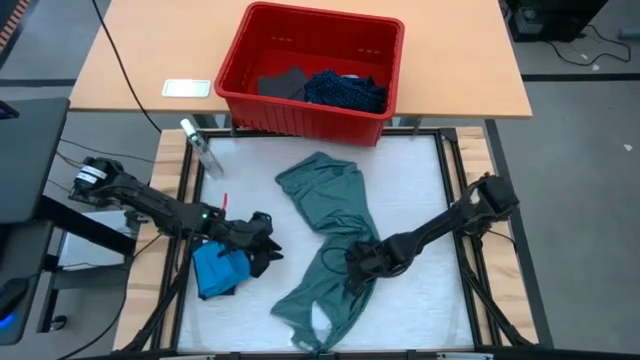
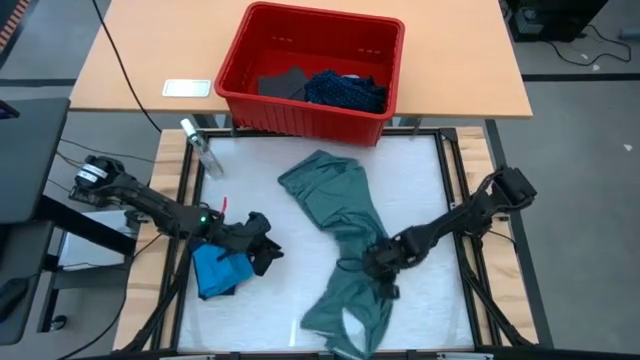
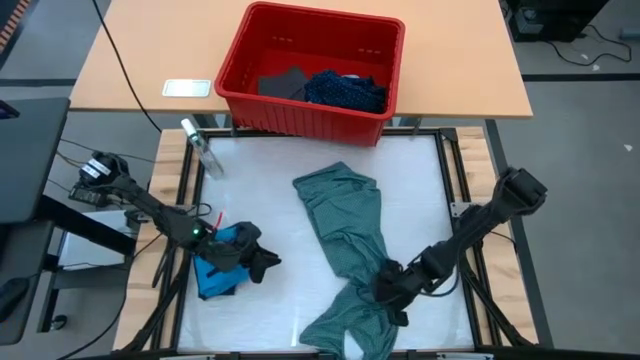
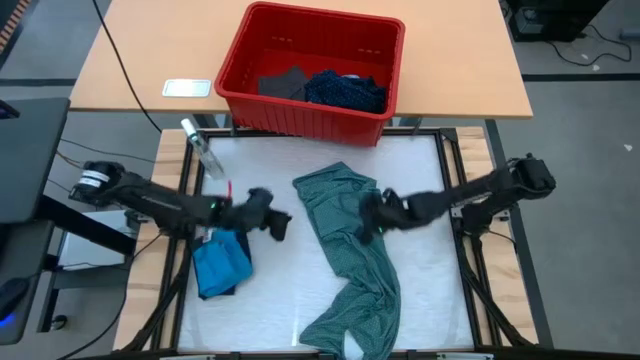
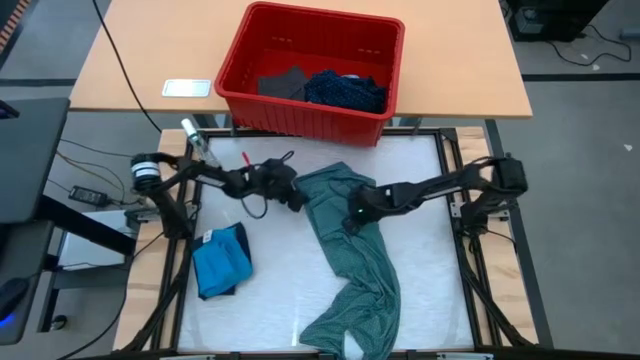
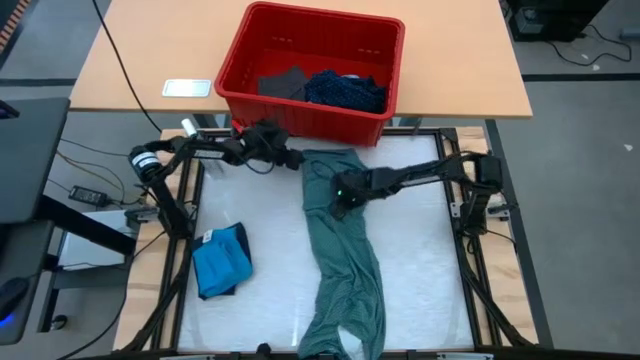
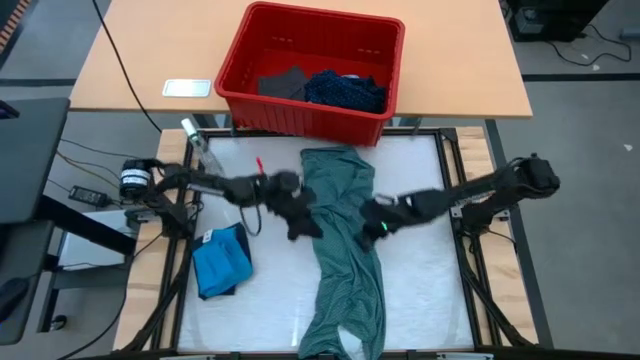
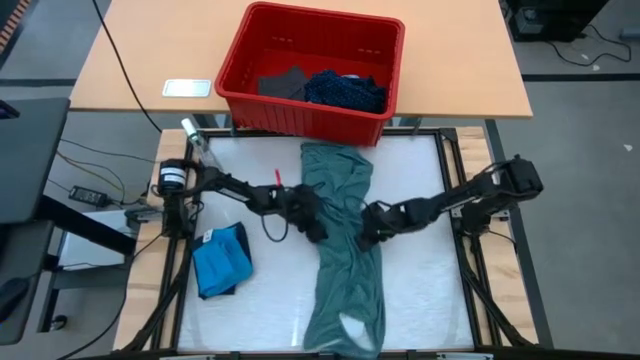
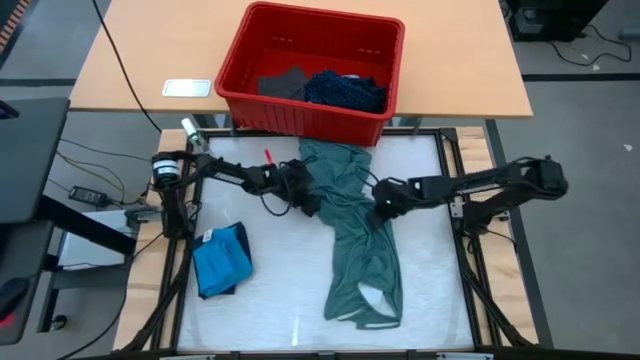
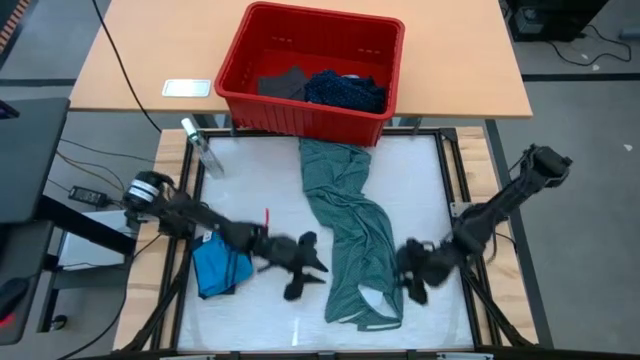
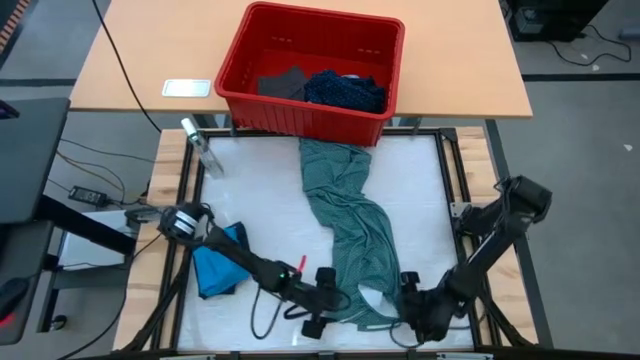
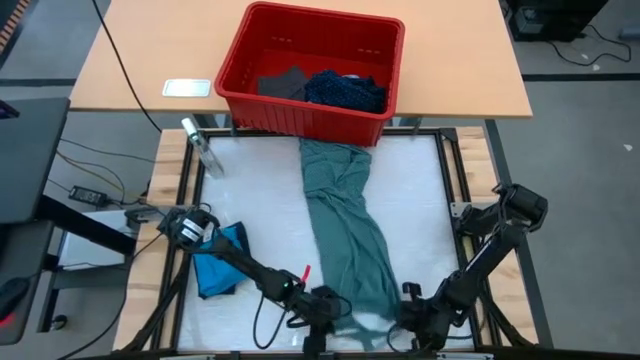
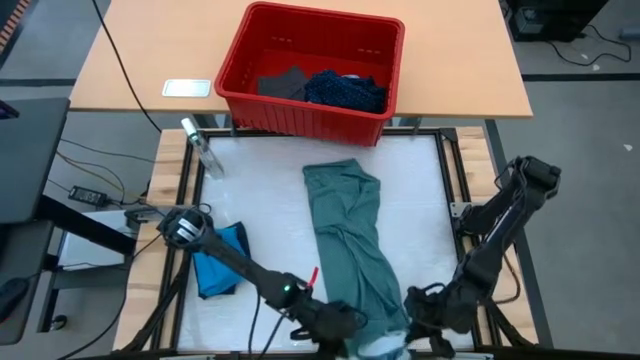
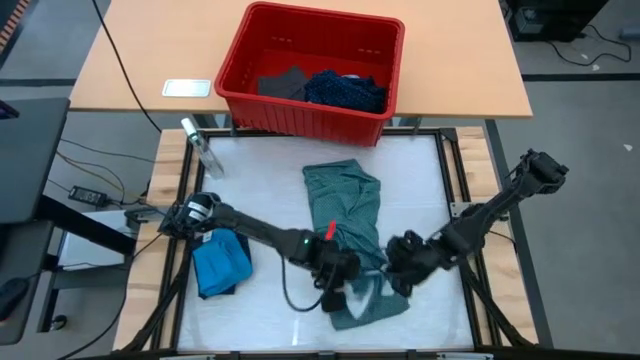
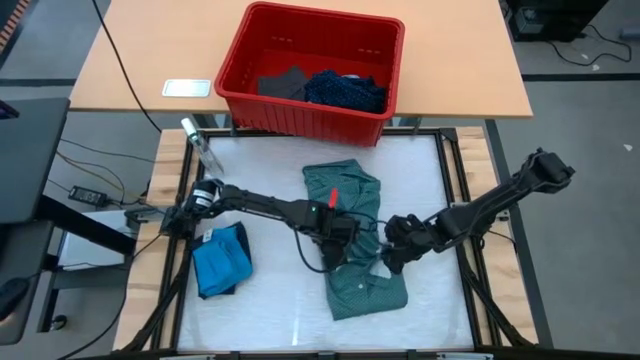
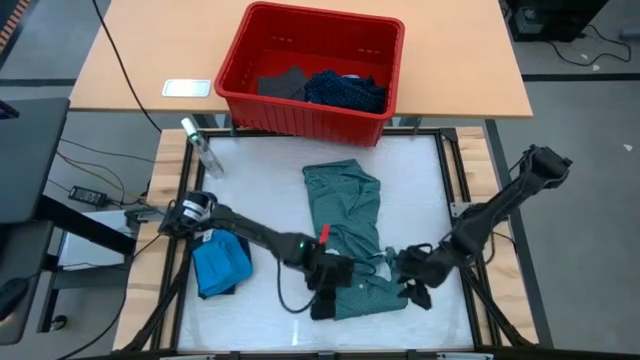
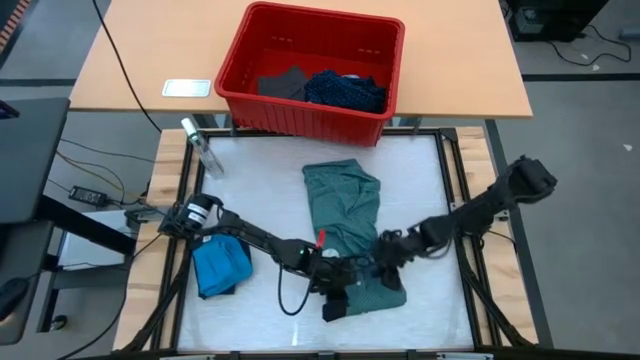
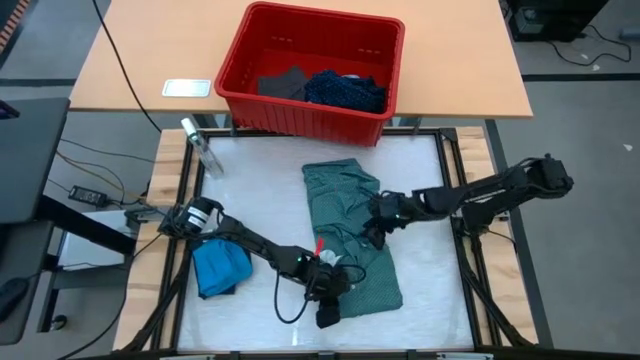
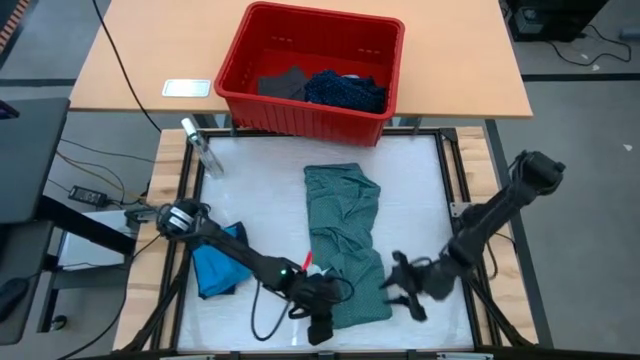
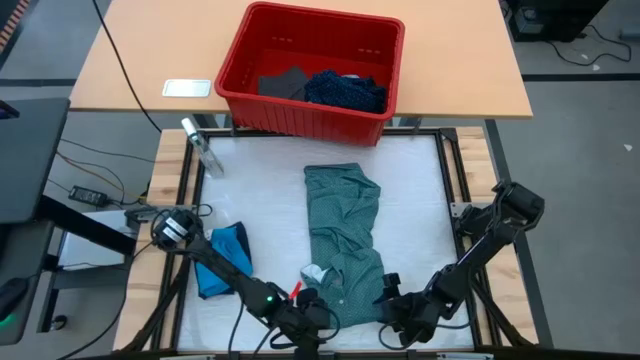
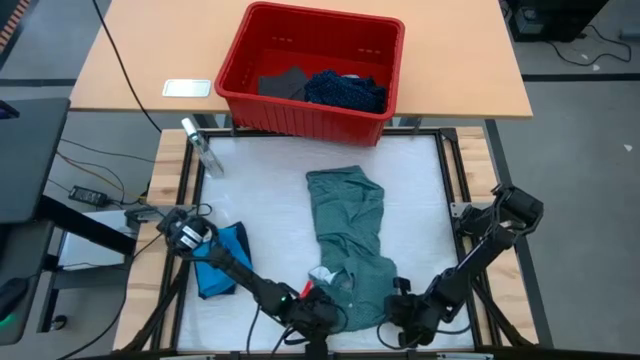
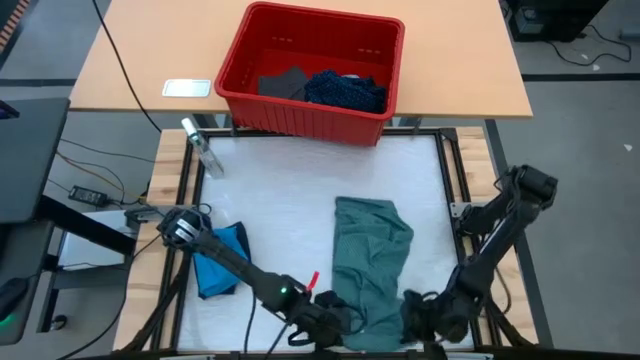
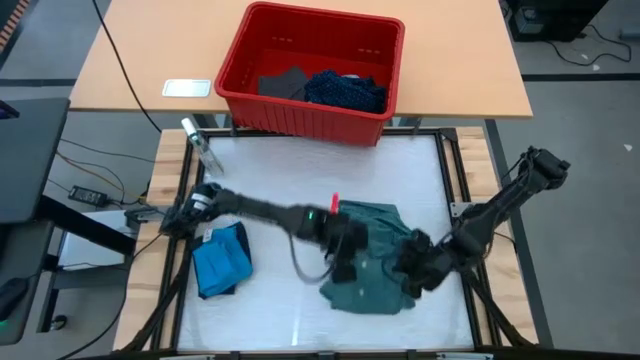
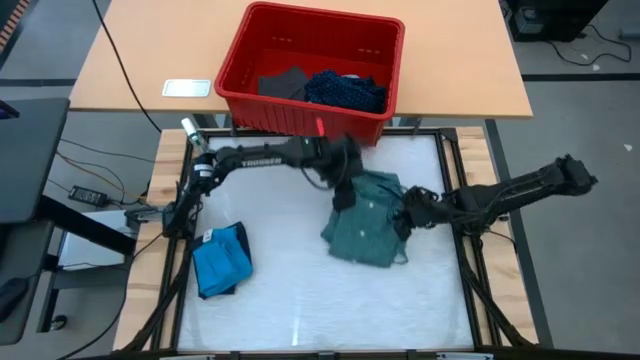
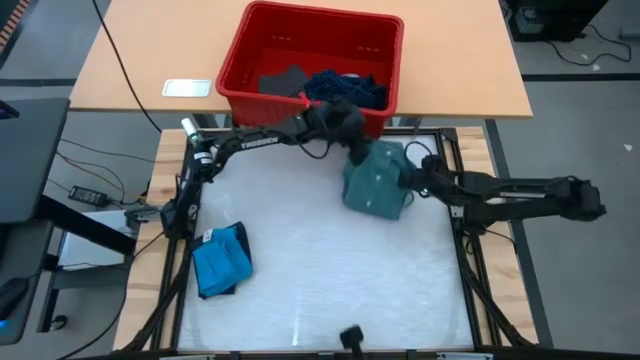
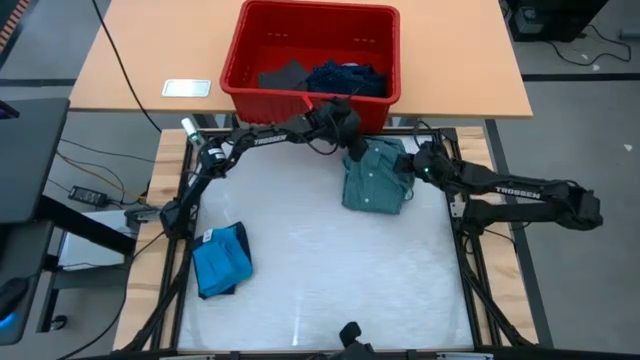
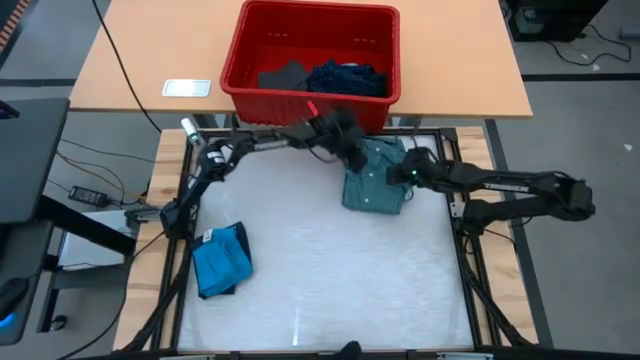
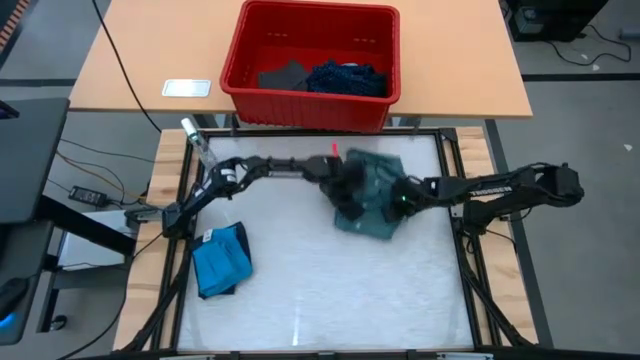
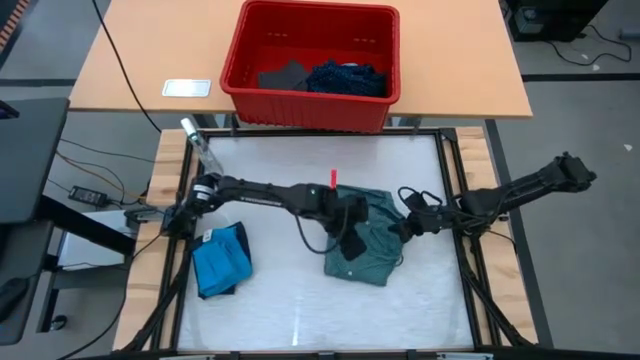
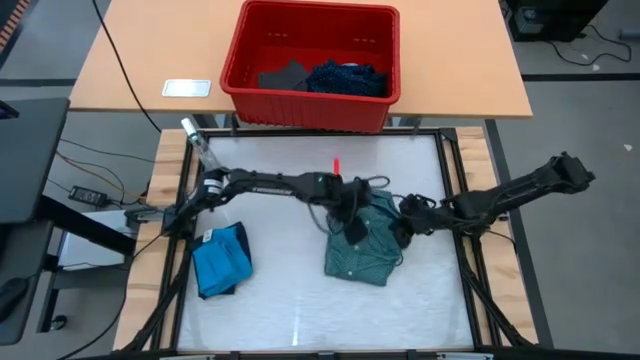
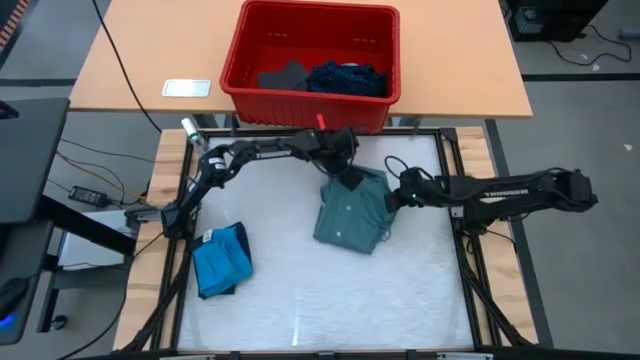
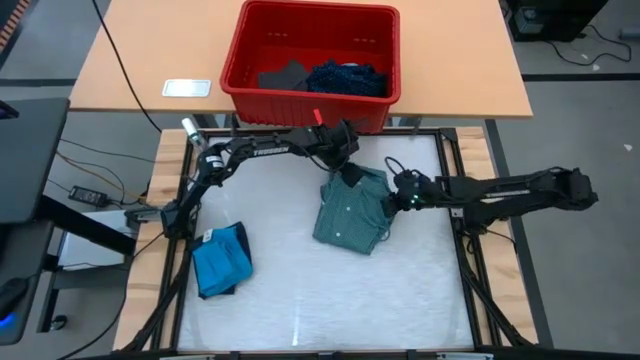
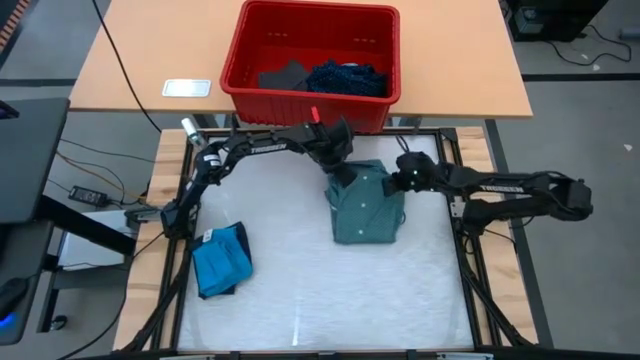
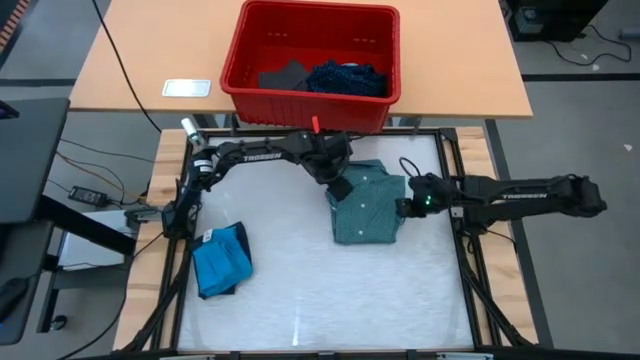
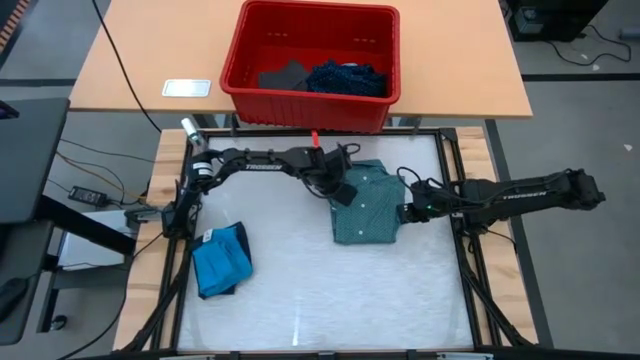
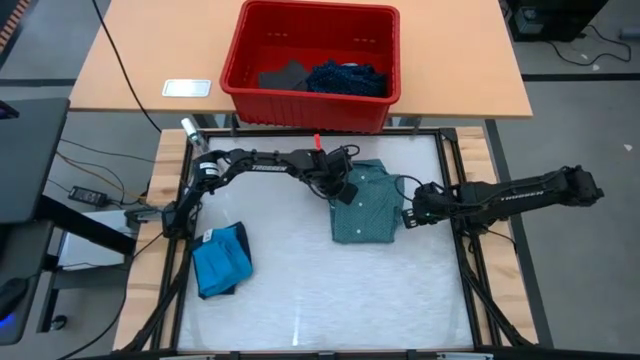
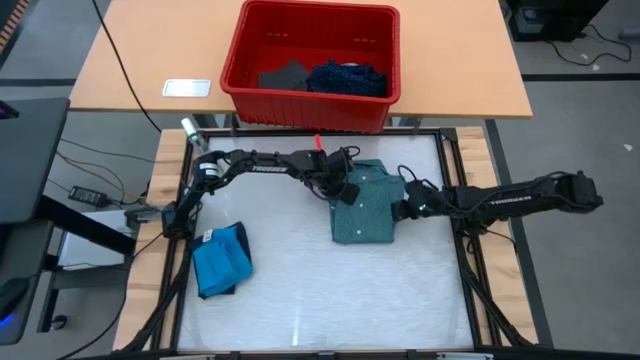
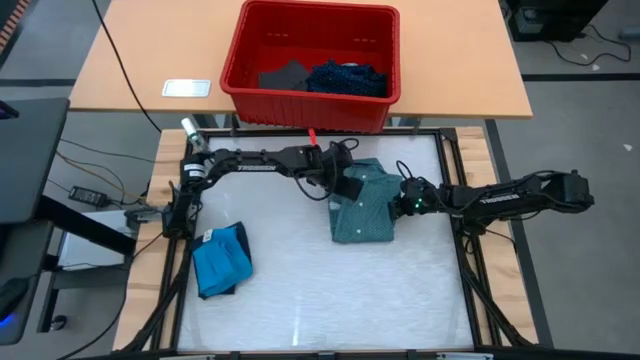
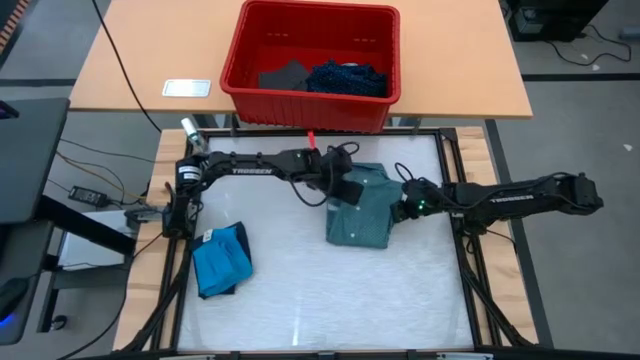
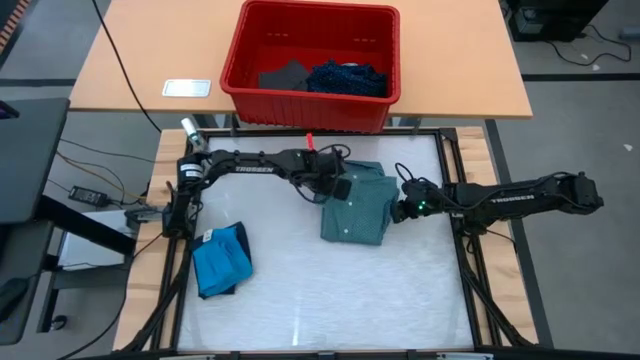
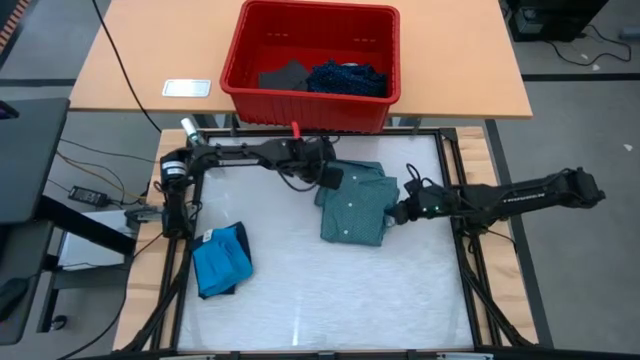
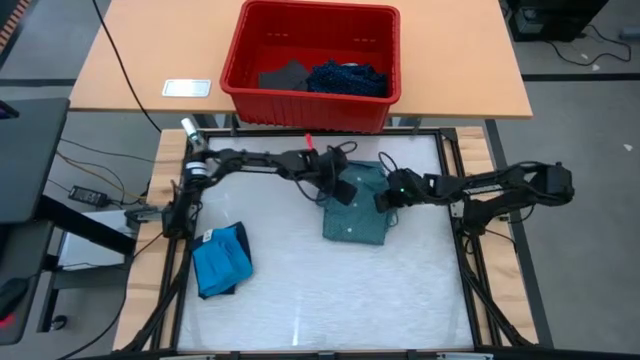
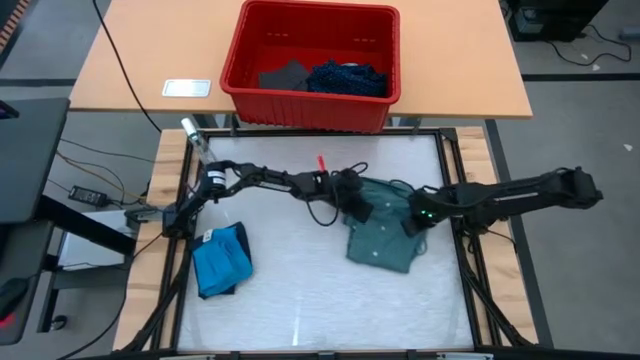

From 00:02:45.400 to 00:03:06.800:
Task: Fold laundry
Fold the green polo shirt
